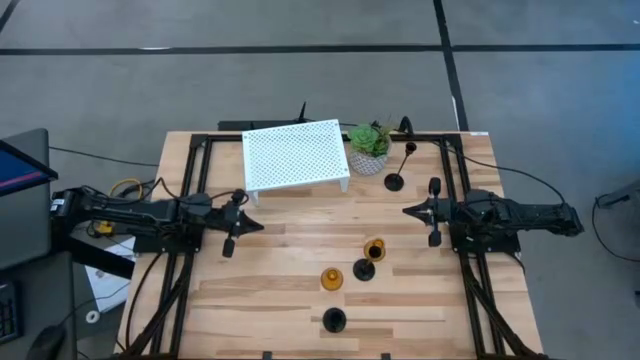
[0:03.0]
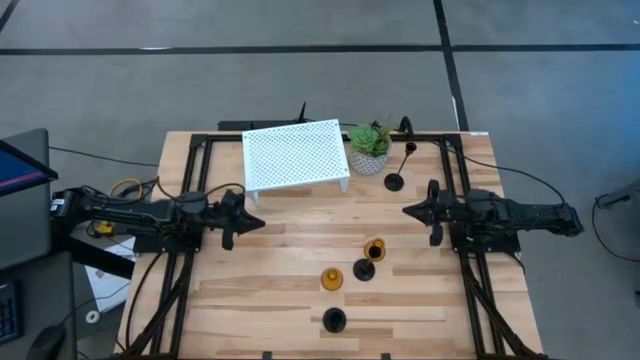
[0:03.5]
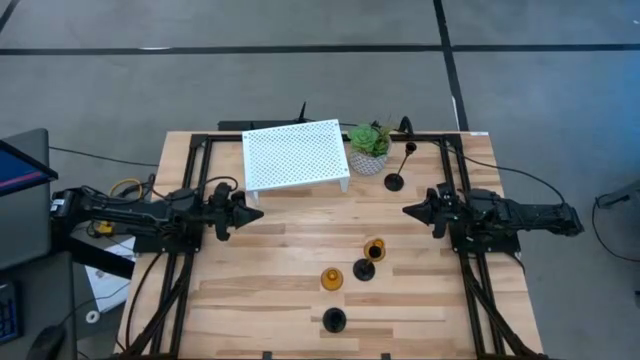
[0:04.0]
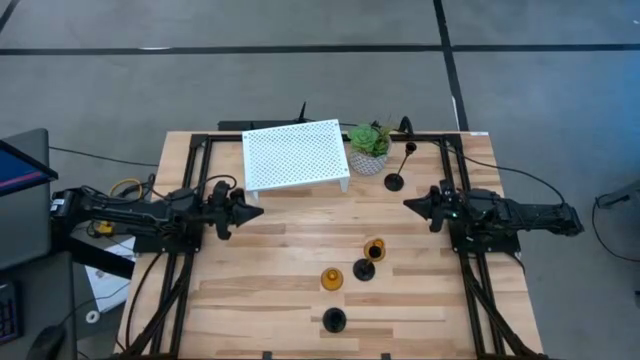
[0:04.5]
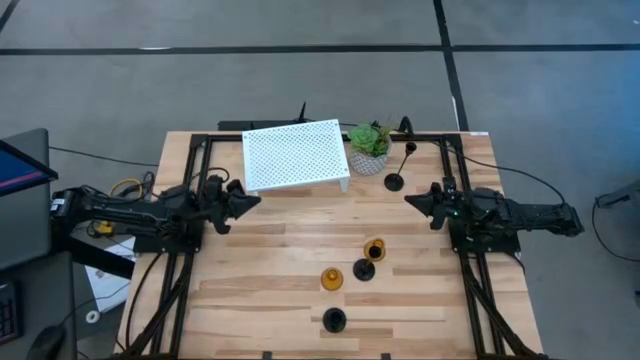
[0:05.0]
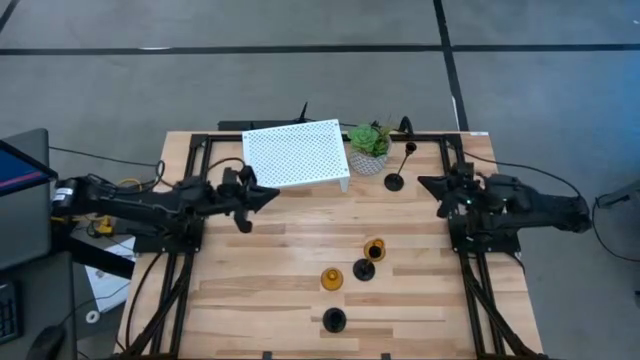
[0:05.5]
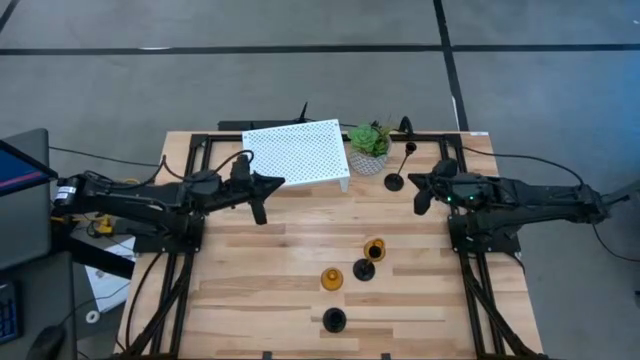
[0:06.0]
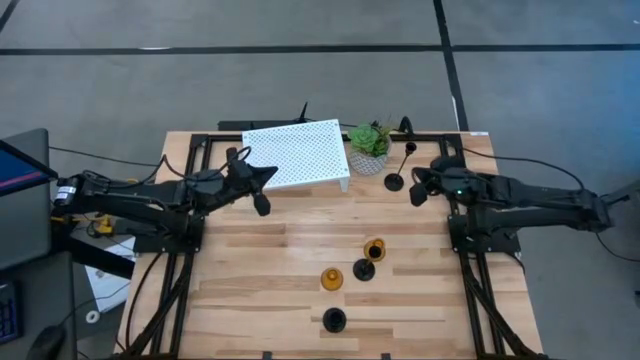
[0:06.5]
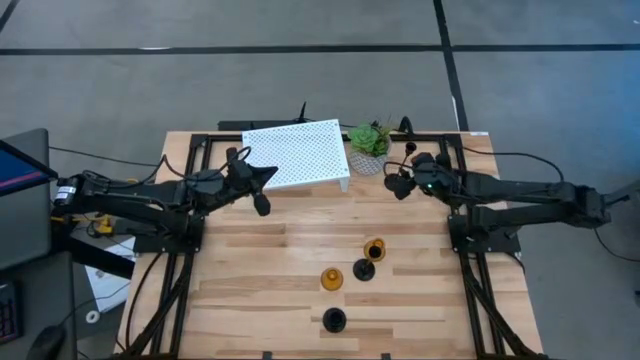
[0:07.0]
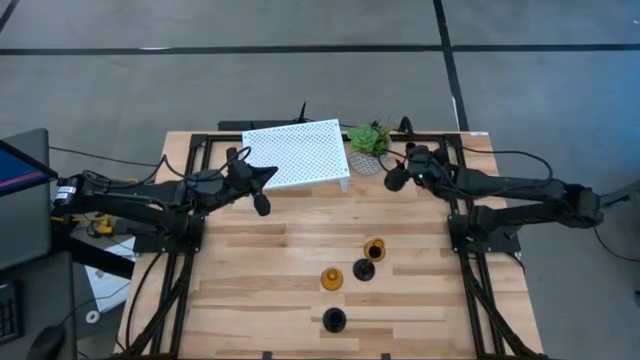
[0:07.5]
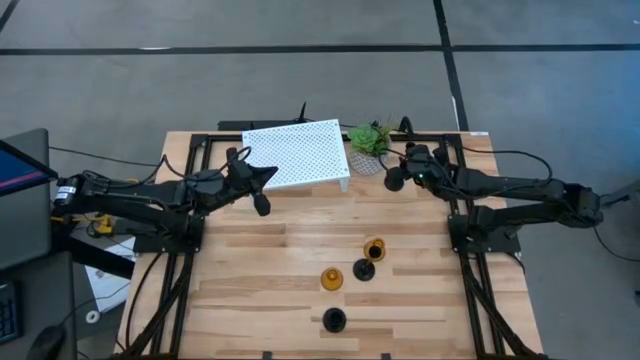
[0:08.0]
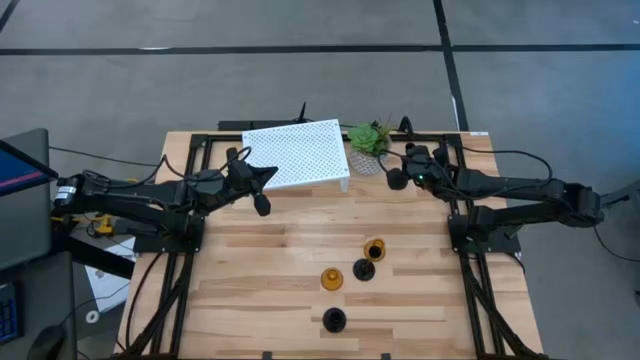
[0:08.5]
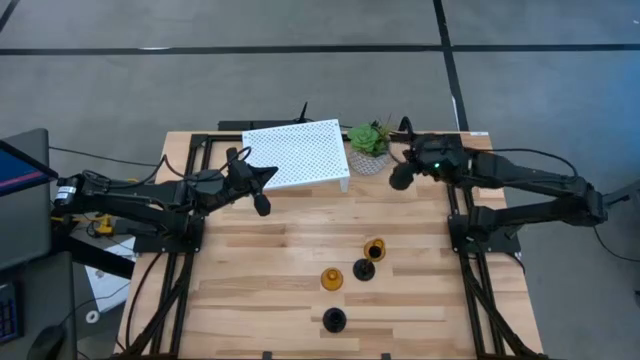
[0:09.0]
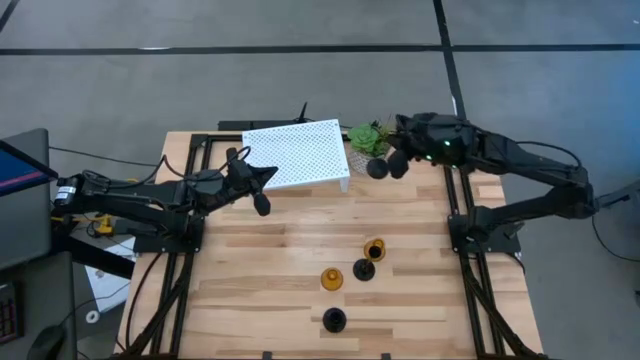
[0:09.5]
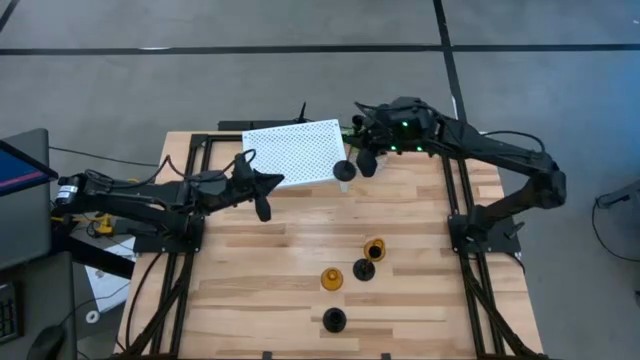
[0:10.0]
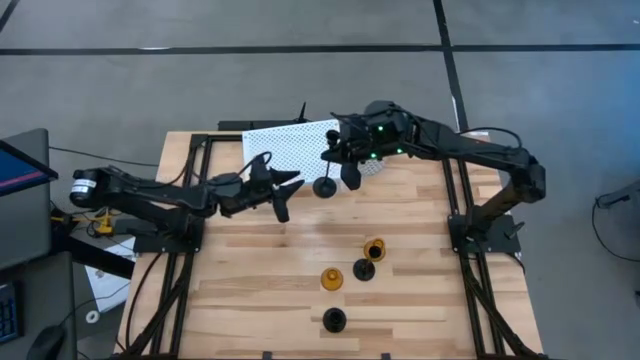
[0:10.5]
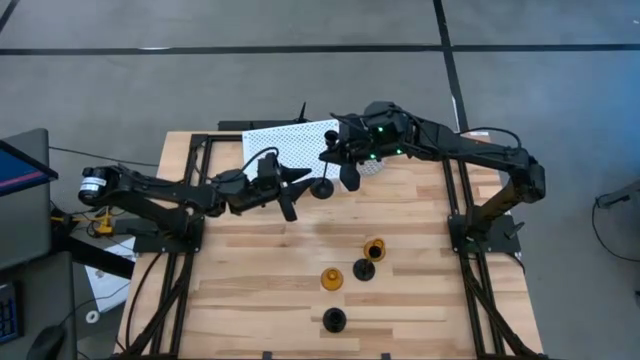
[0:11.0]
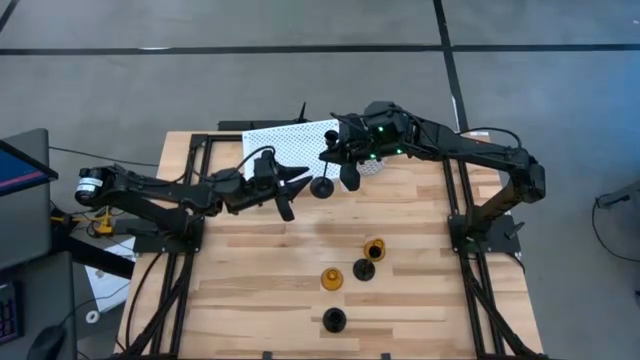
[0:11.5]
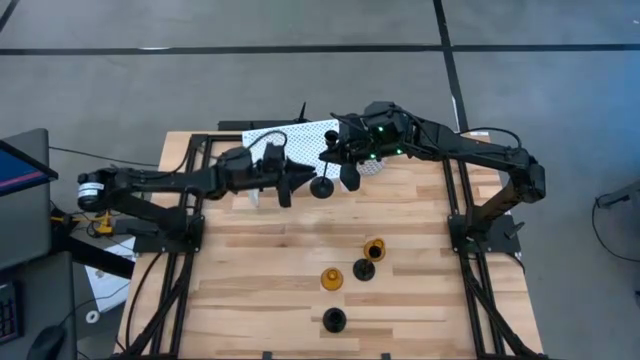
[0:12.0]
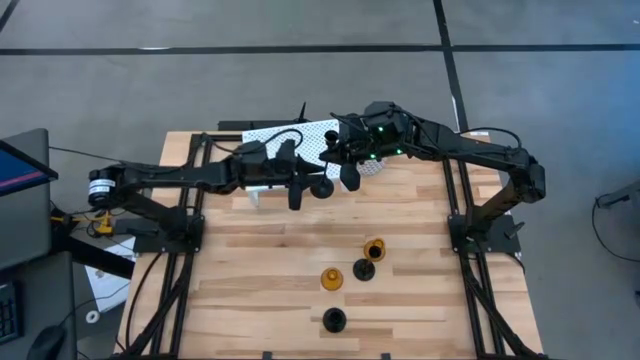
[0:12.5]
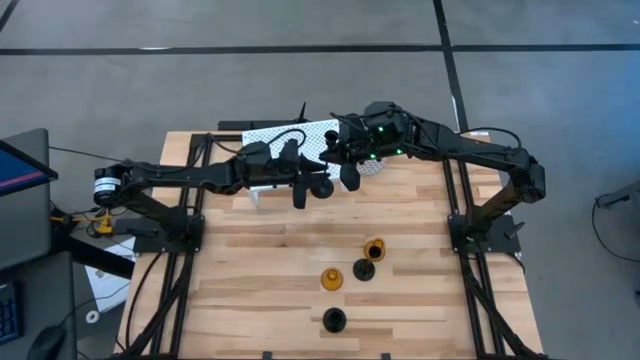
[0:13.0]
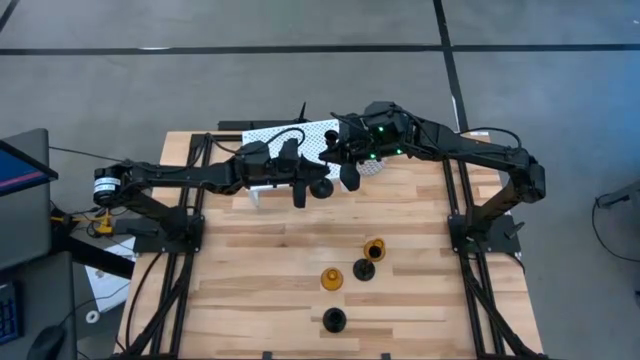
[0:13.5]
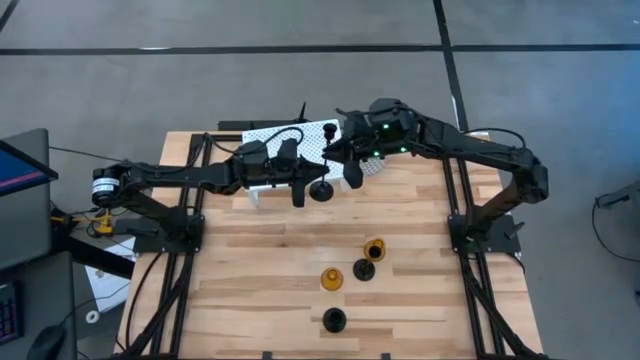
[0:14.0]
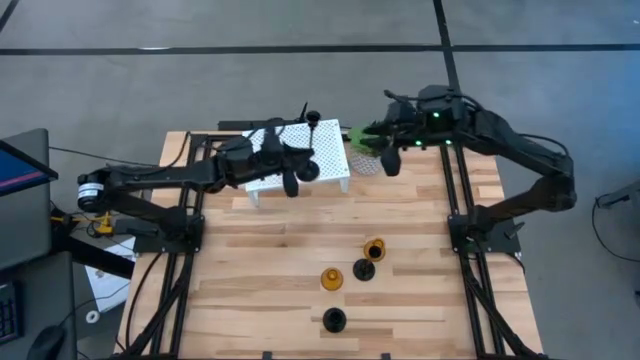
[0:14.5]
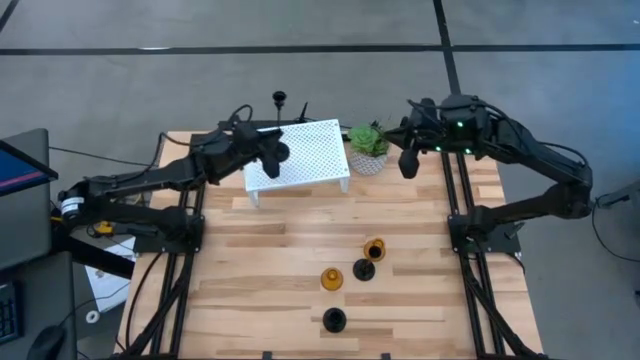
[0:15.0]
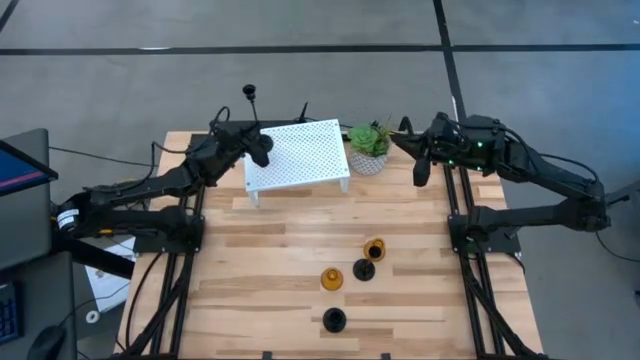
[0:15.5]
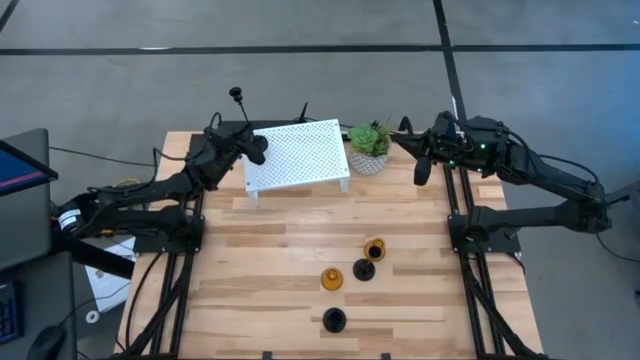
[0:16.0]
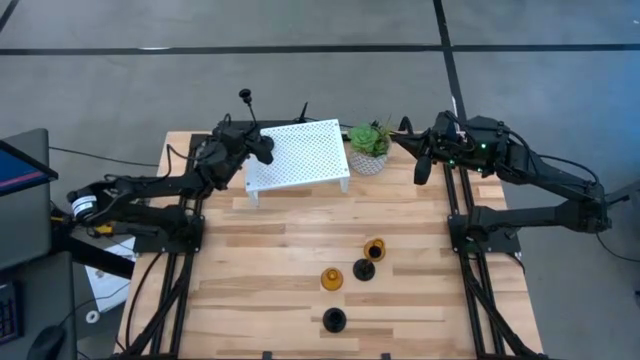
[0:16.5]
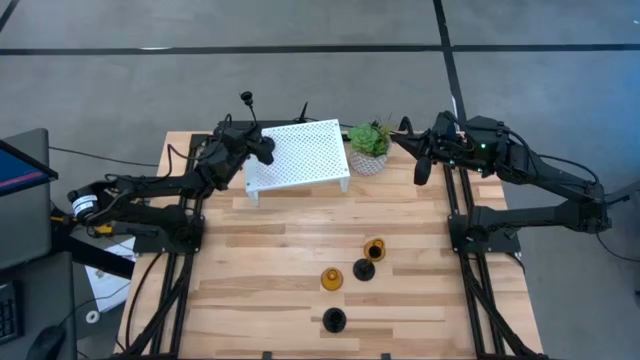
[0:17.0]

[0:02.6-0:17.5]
Task: Pick & Place candle stick holders
Put the top black candle holder on the shelf
